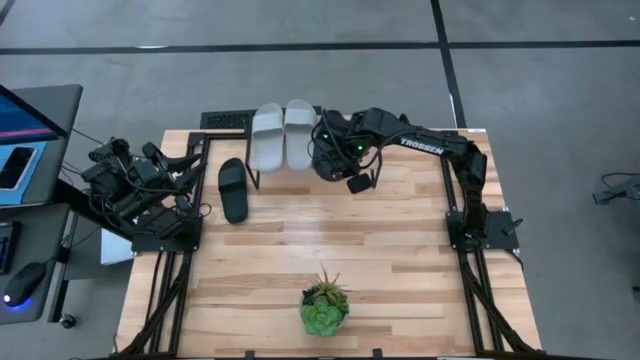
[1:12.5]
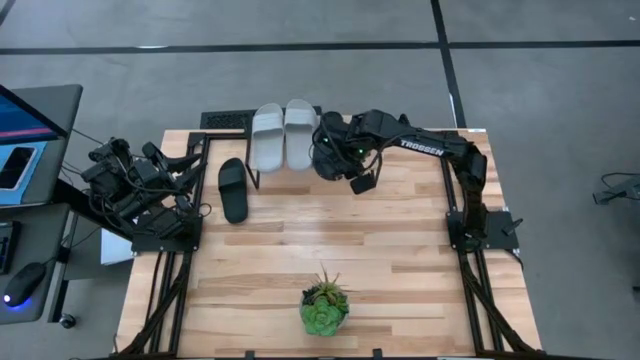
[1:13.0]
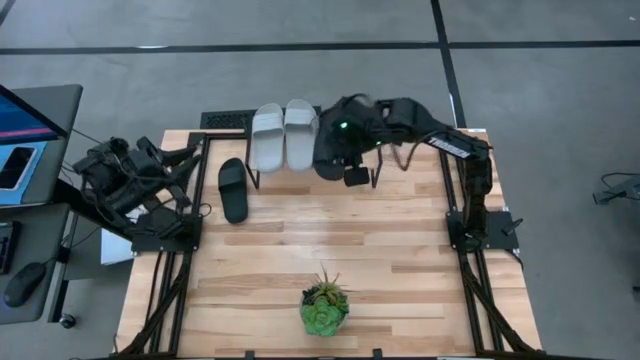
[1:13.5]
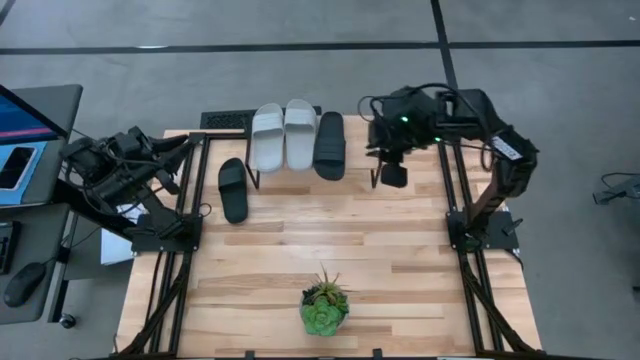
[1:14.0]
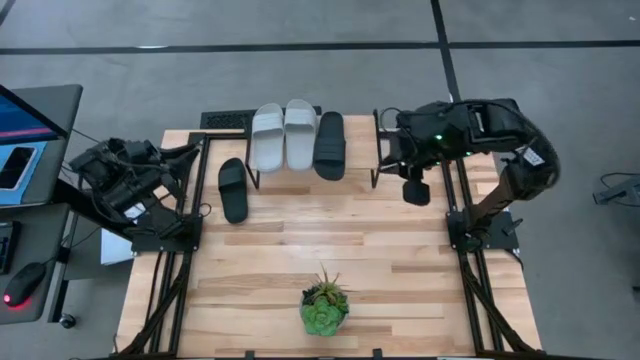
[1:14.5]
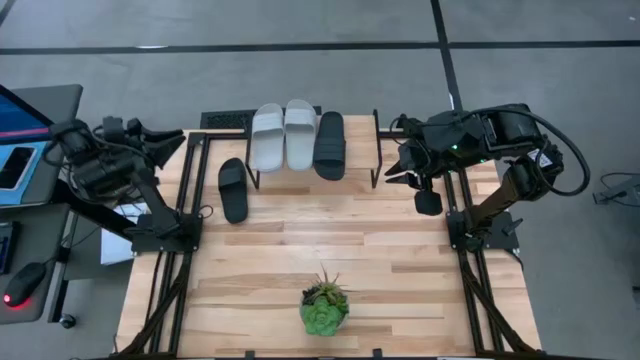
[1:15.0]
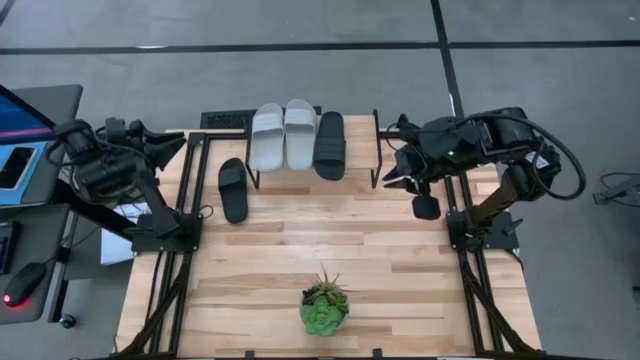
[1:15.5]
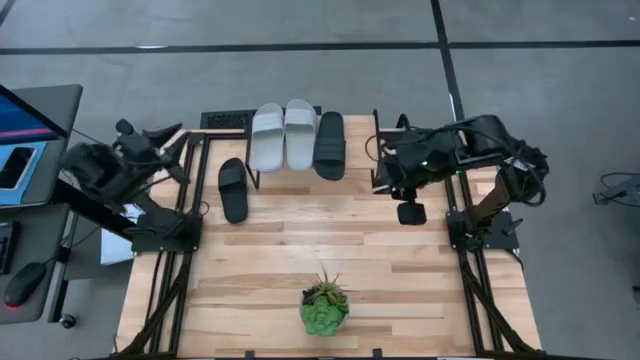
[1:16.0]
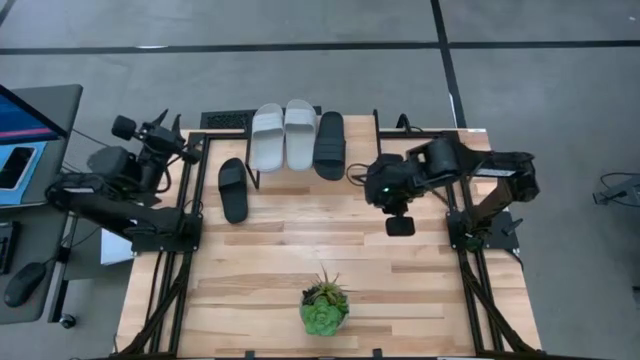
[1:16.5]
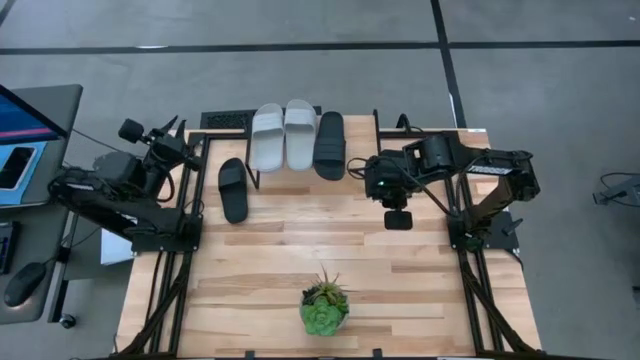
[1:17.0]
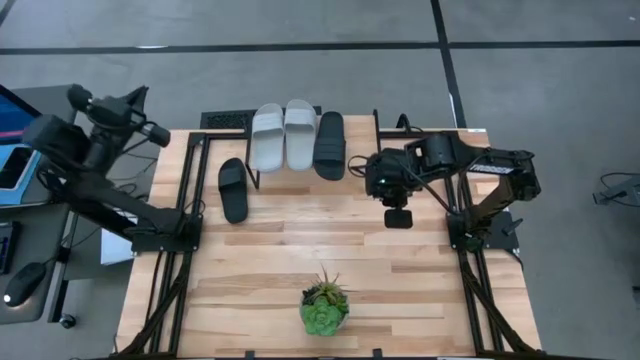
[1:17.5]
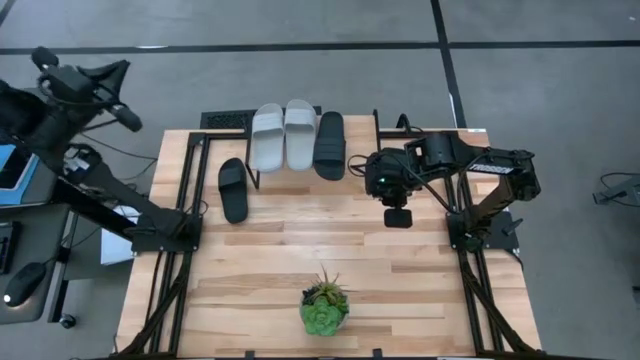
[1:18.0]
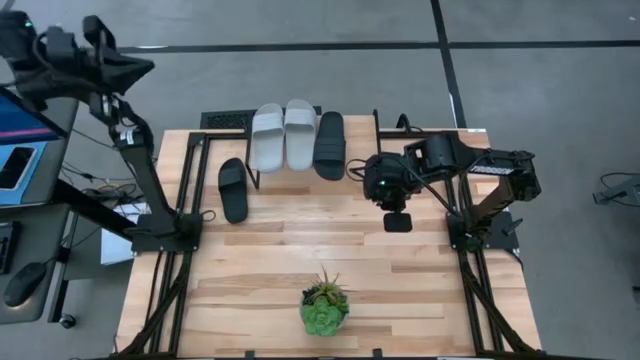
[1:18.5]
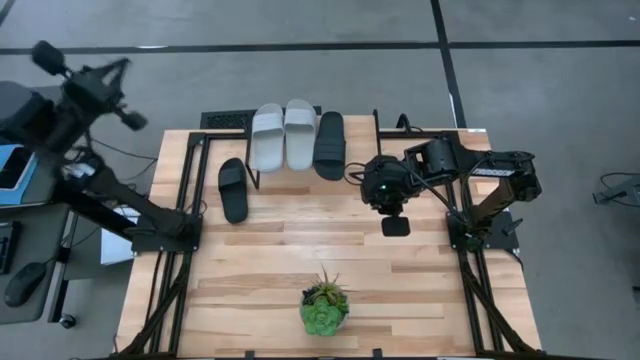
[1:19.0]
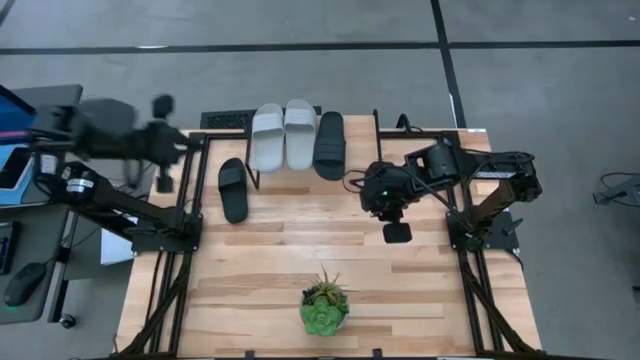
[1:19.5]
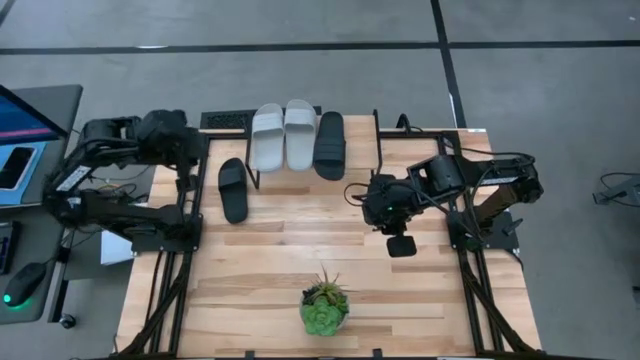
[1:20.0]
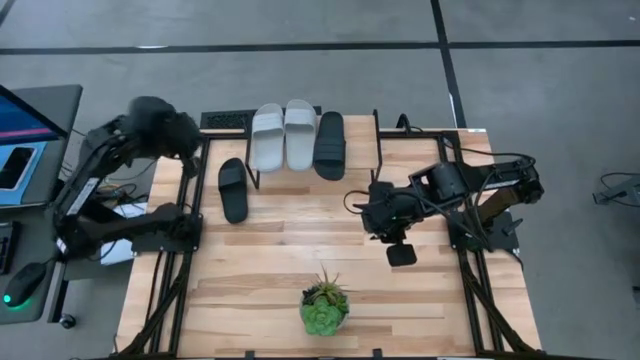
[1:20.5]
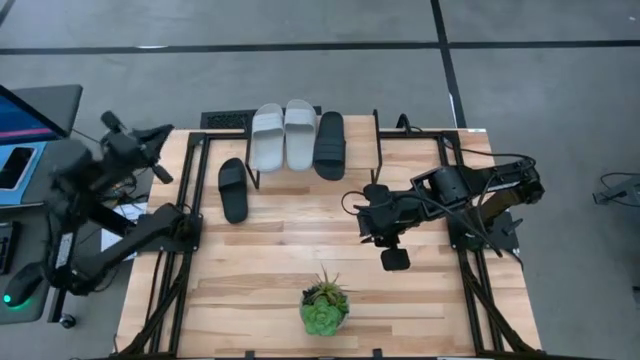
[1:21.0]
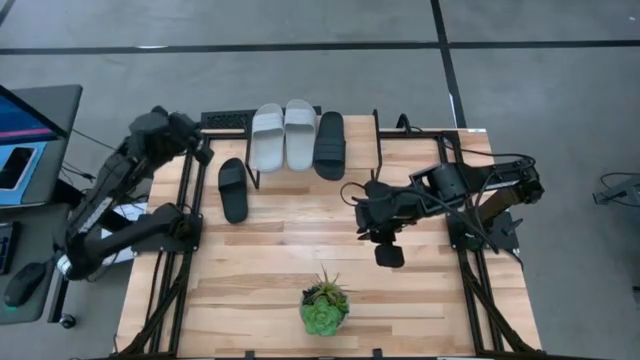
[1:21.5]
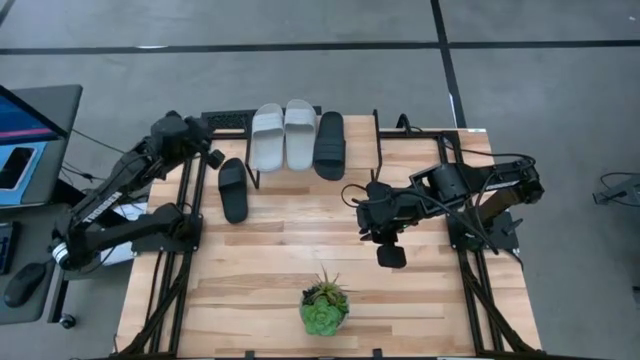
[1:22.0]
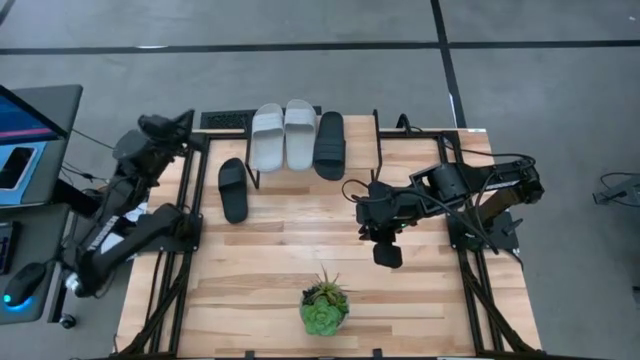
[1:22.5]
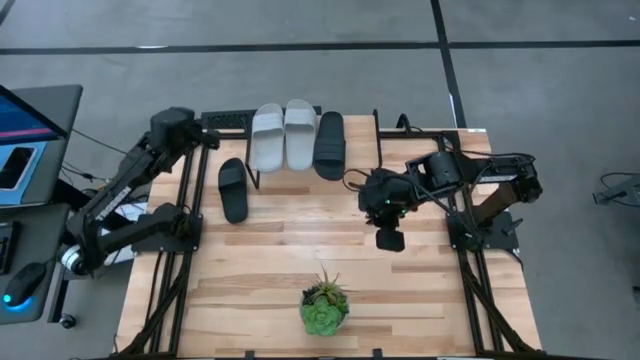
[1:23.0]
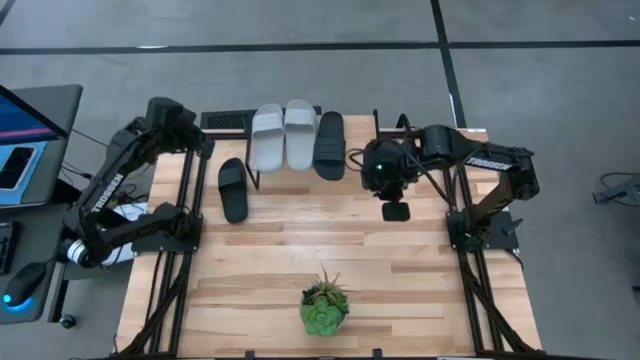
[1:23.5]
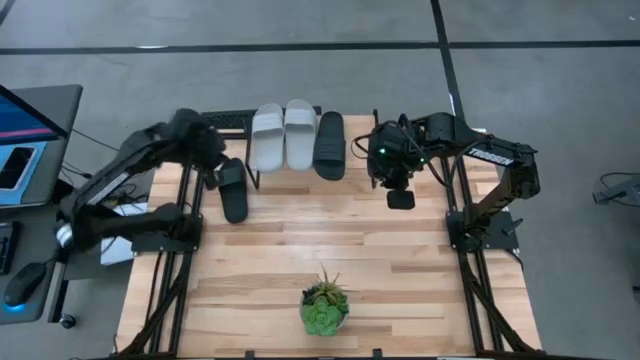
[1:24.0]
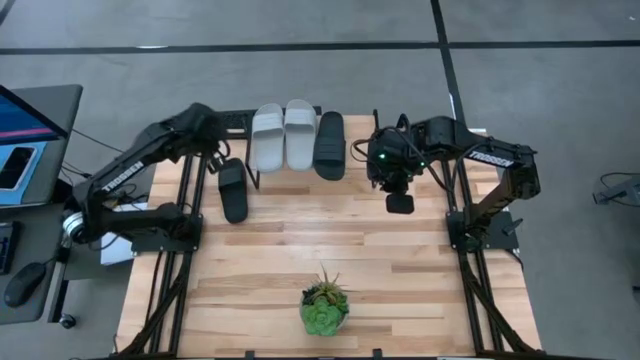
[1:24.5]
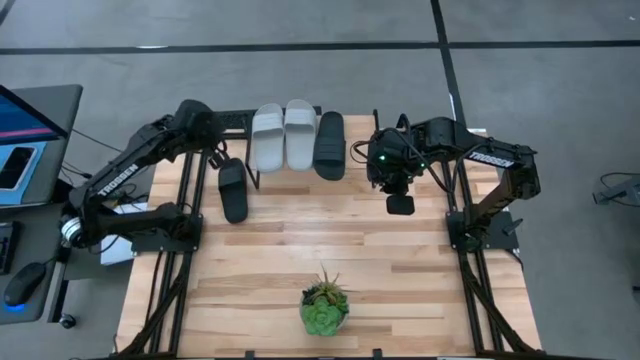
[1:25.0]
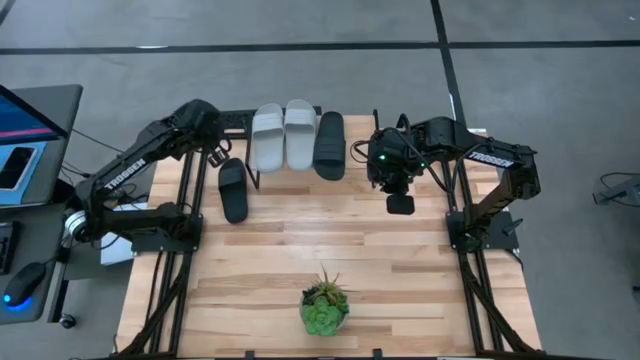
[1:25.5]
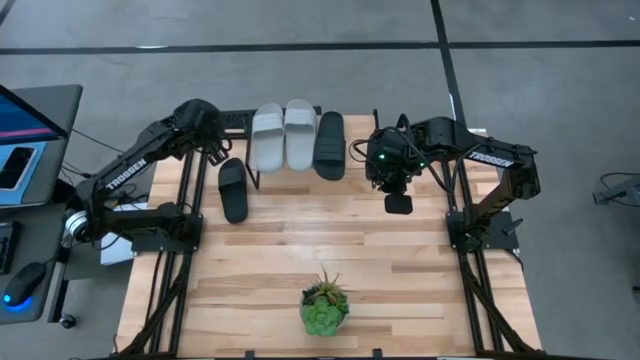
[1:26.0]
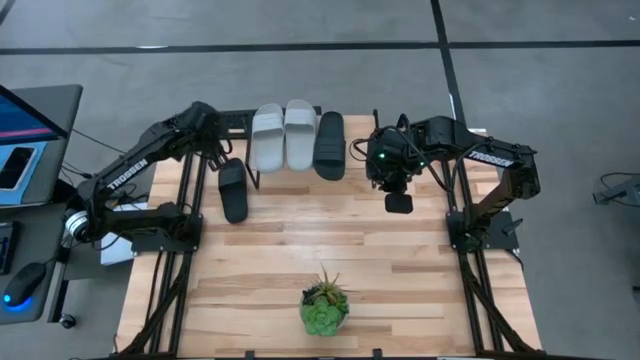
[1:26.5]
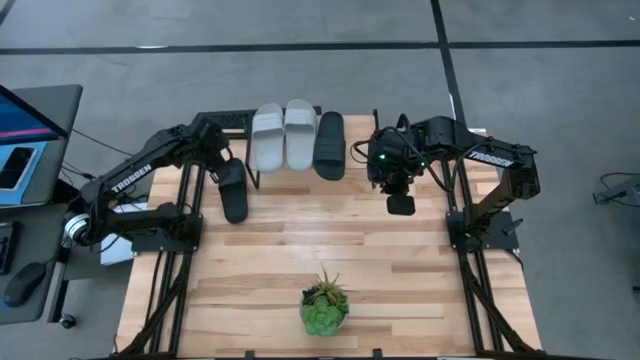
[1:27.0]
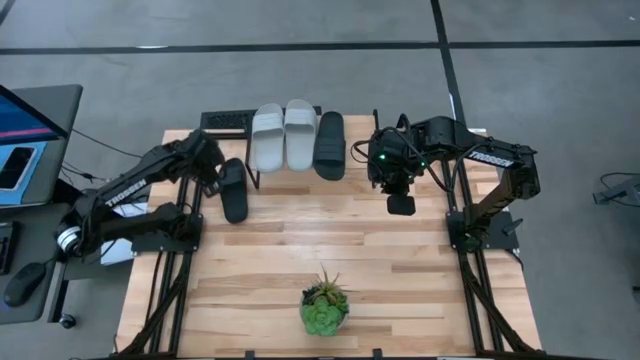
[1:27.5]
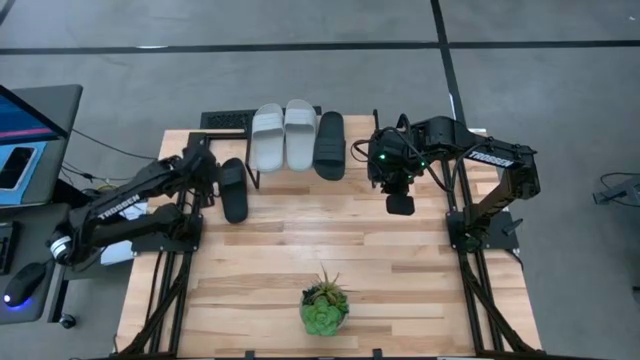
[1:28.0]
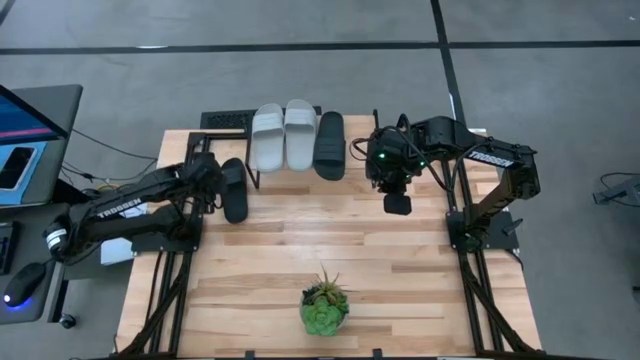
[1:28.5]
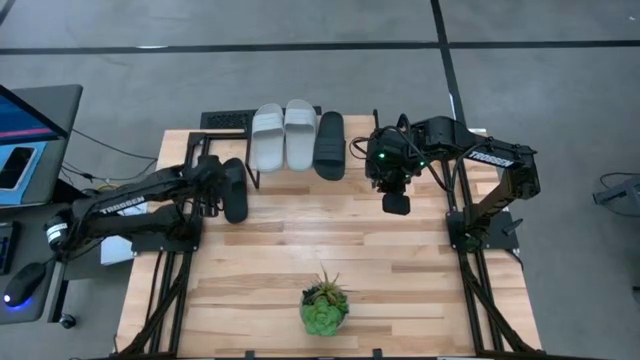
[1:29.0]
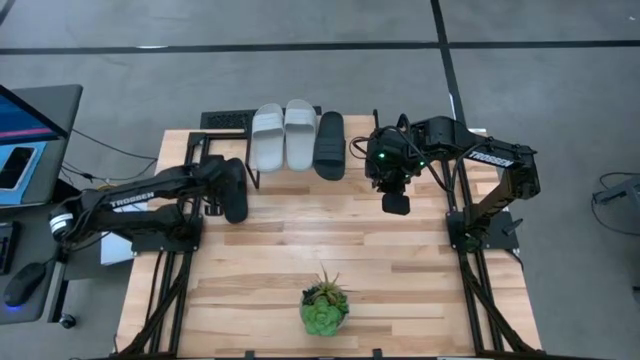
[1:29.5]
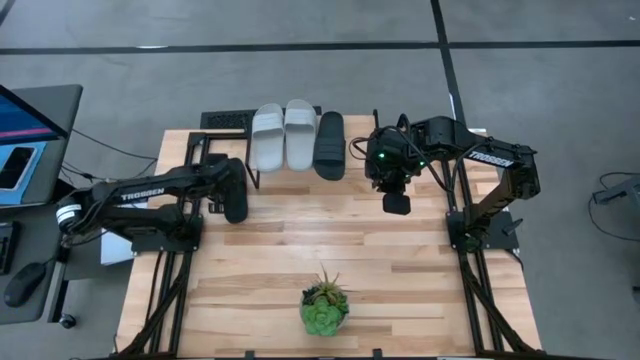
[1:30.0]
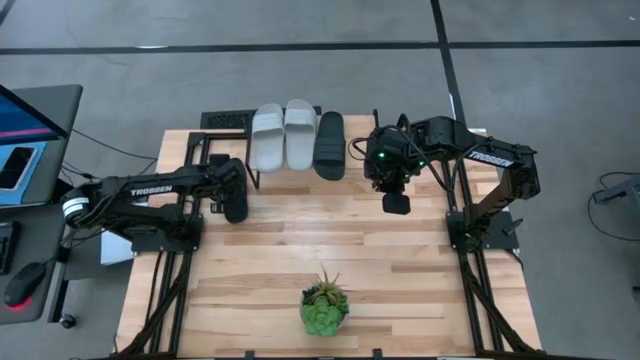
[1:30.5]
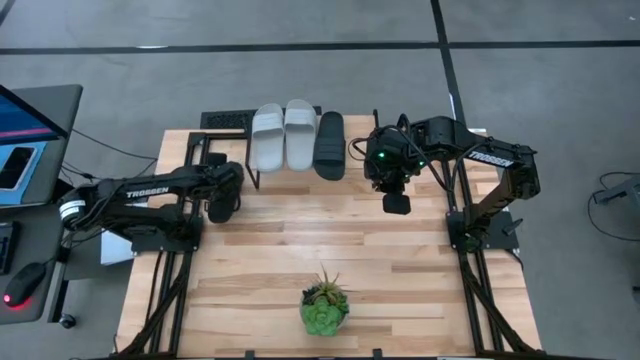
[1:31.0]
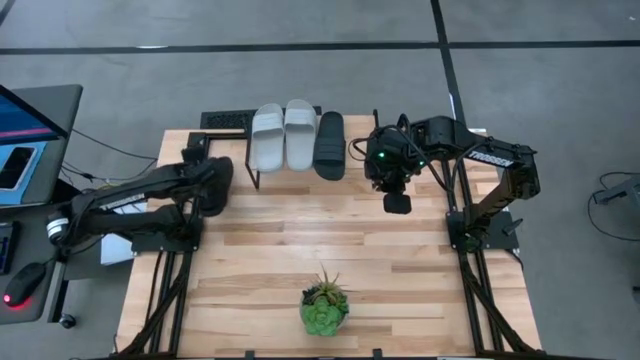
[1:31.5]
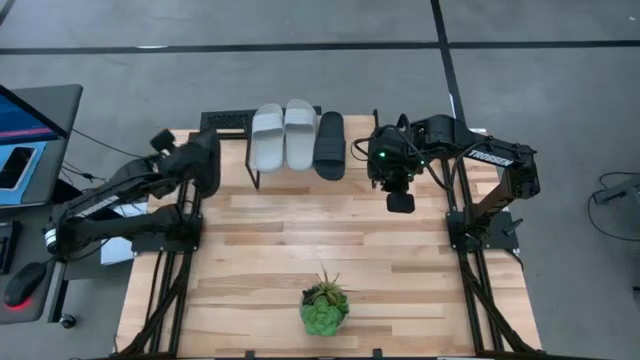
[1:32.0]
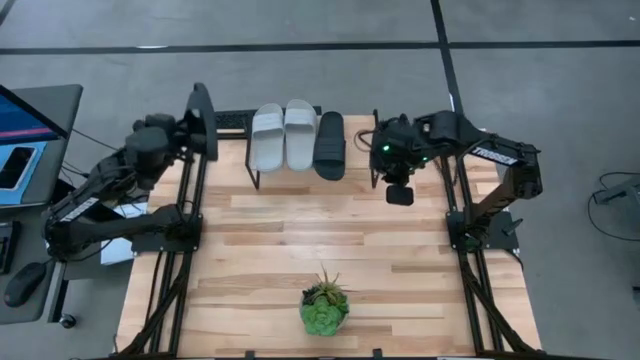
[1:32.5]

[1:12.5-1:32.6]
Task: Pick and place slides into the shelf
Put the black slide on the shelf
